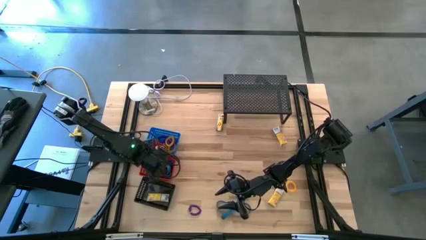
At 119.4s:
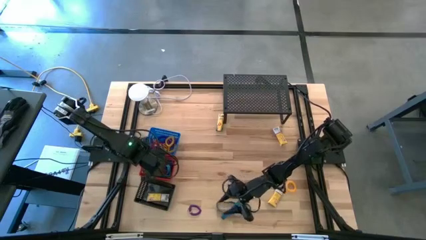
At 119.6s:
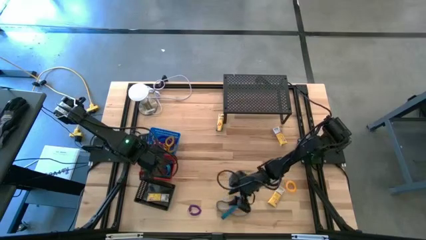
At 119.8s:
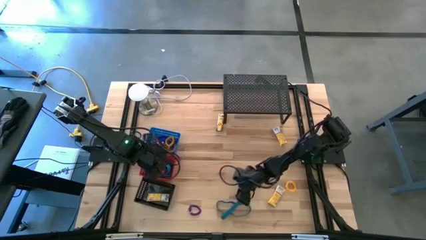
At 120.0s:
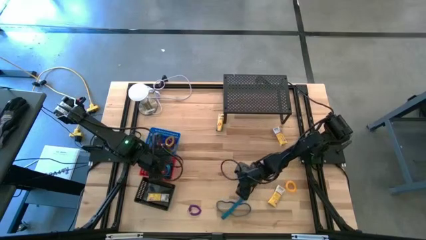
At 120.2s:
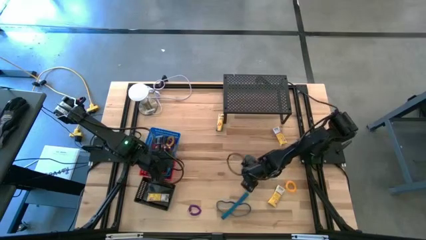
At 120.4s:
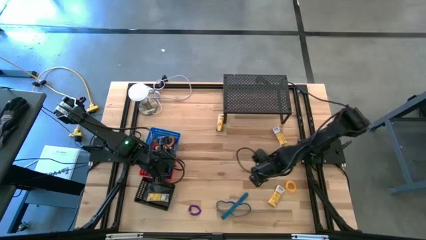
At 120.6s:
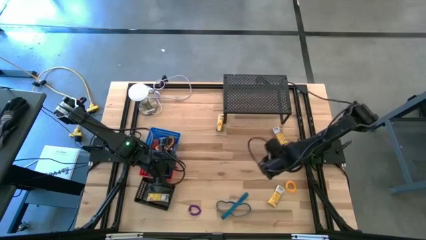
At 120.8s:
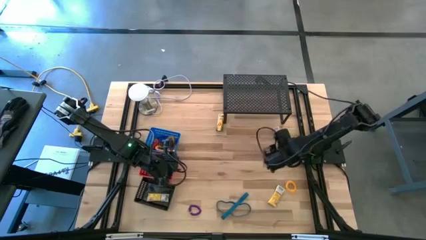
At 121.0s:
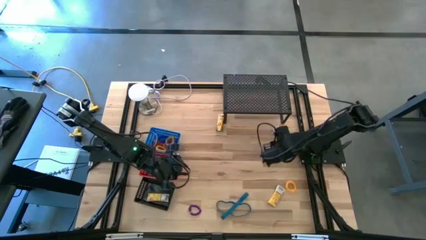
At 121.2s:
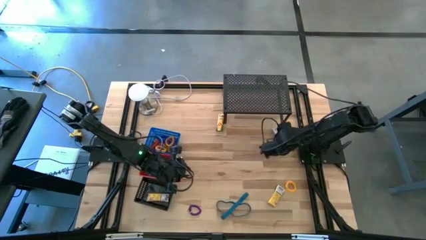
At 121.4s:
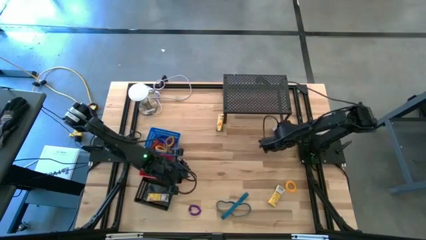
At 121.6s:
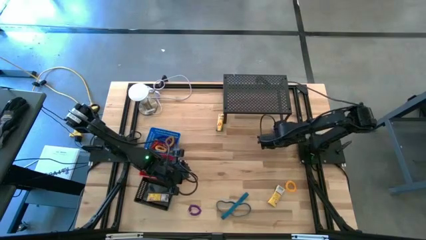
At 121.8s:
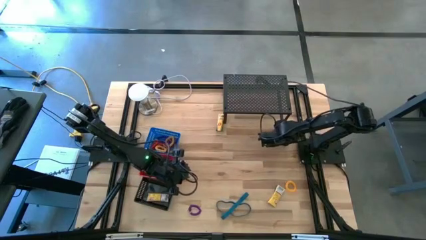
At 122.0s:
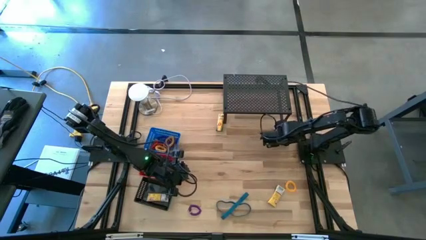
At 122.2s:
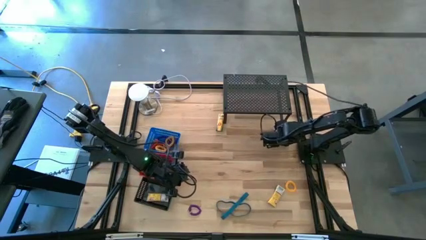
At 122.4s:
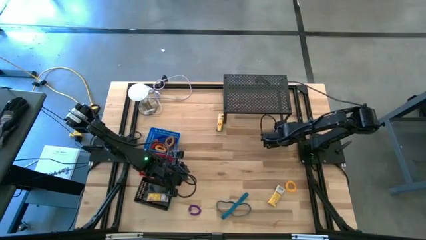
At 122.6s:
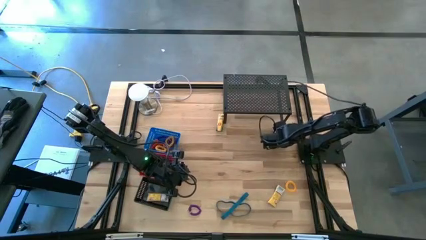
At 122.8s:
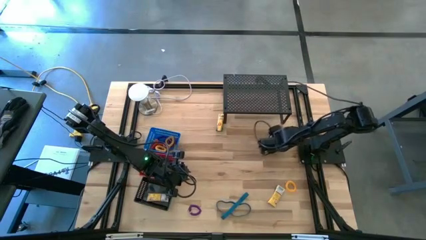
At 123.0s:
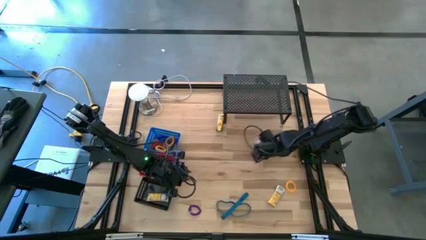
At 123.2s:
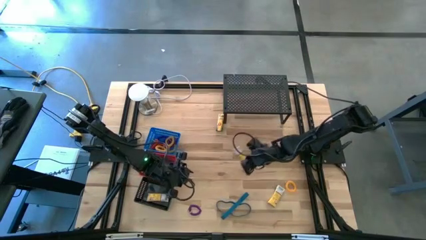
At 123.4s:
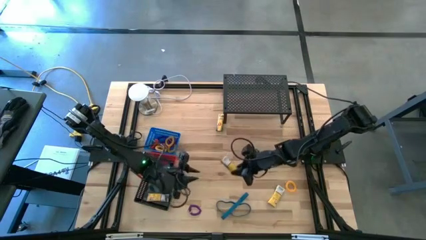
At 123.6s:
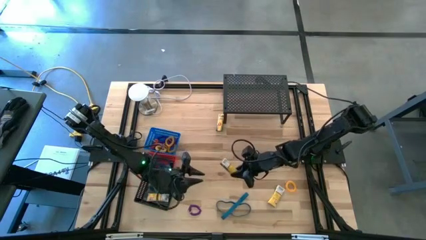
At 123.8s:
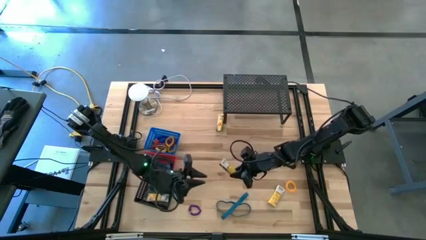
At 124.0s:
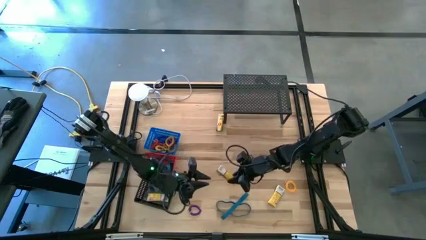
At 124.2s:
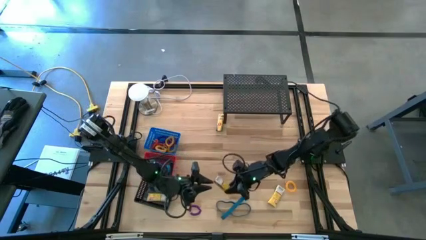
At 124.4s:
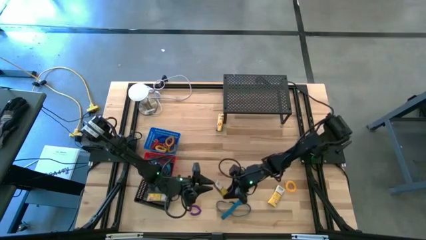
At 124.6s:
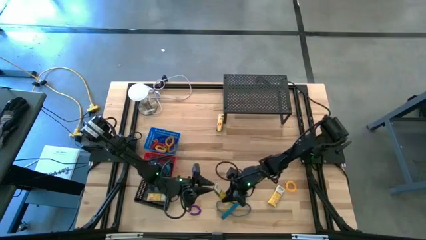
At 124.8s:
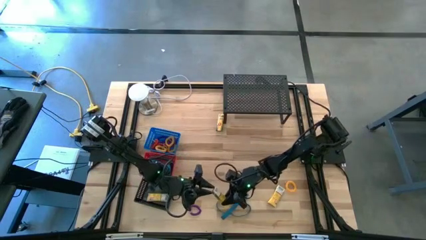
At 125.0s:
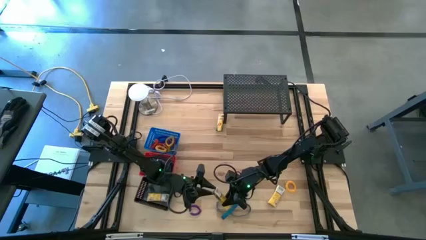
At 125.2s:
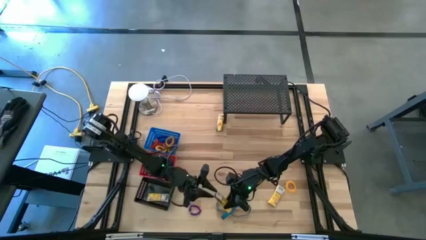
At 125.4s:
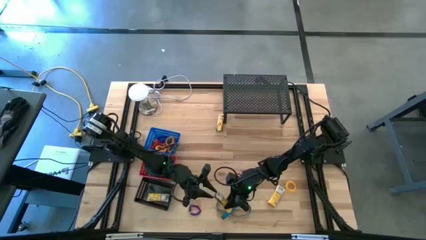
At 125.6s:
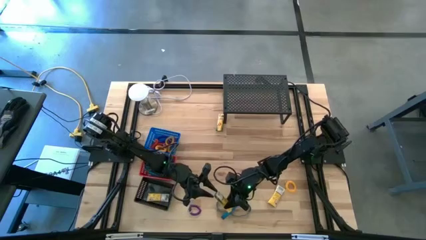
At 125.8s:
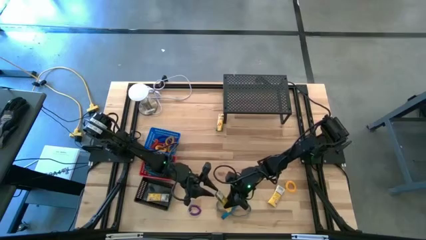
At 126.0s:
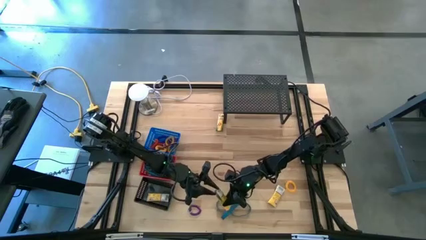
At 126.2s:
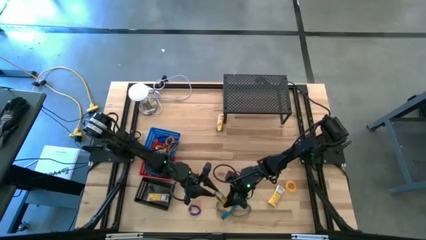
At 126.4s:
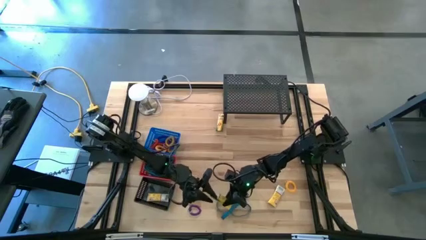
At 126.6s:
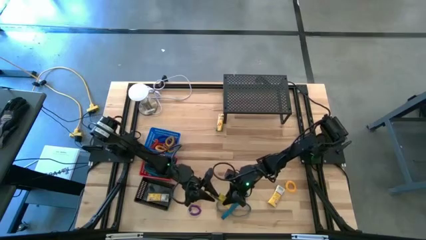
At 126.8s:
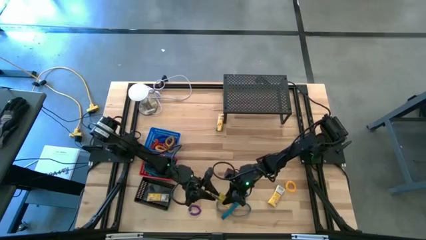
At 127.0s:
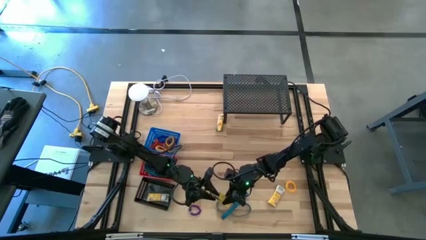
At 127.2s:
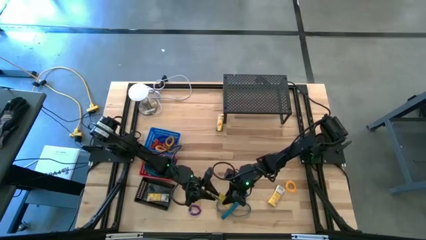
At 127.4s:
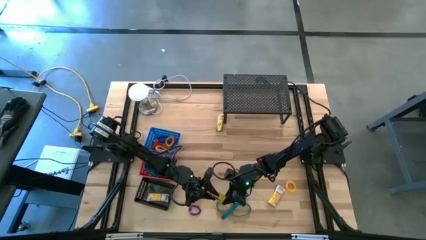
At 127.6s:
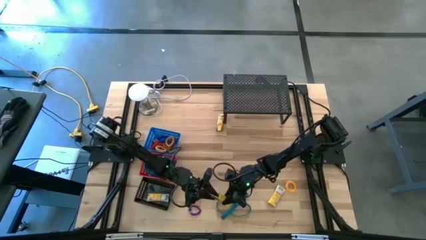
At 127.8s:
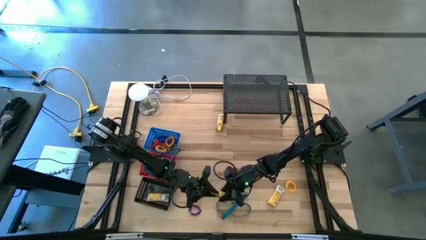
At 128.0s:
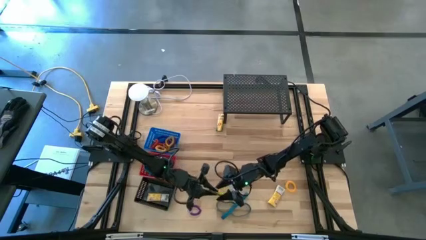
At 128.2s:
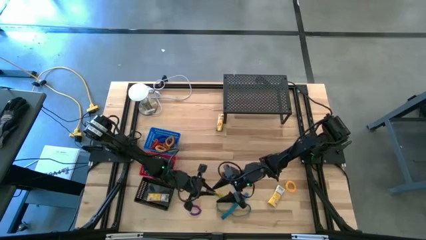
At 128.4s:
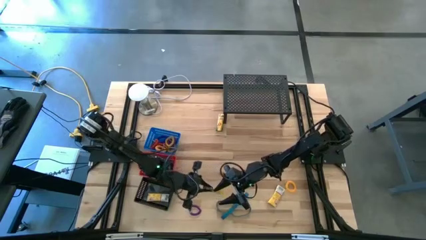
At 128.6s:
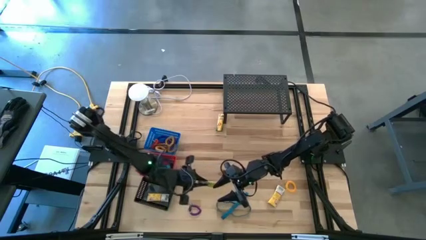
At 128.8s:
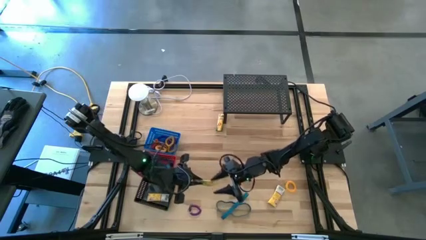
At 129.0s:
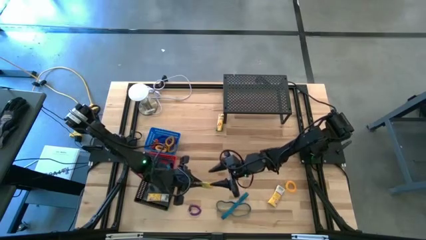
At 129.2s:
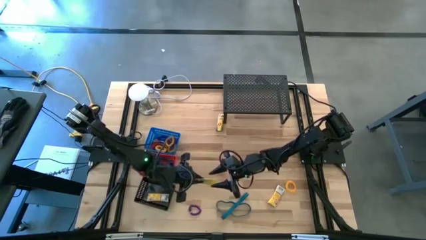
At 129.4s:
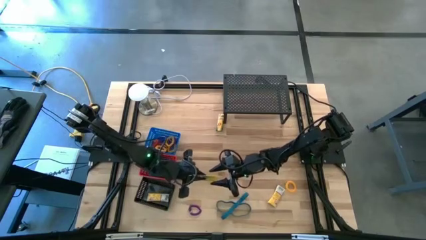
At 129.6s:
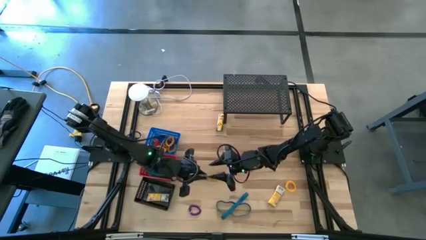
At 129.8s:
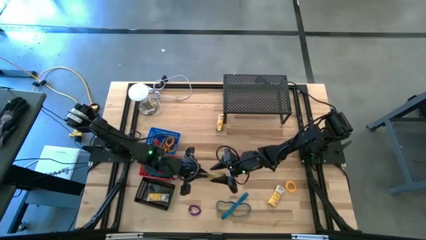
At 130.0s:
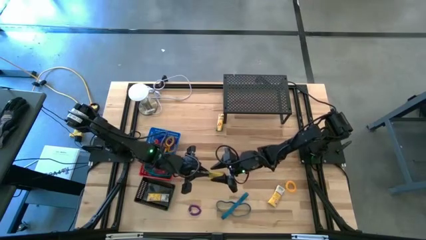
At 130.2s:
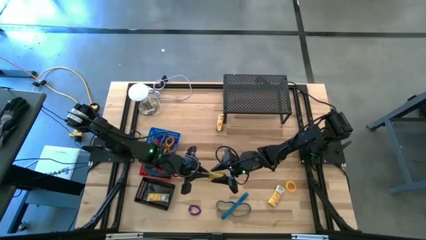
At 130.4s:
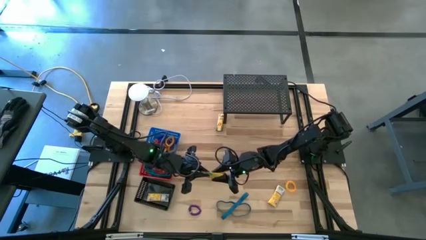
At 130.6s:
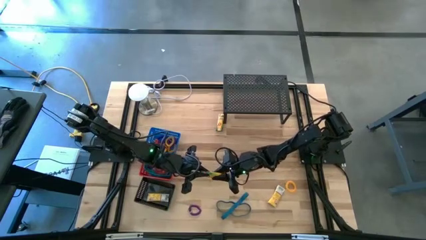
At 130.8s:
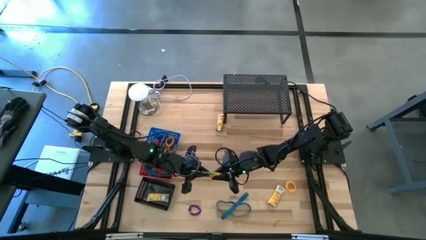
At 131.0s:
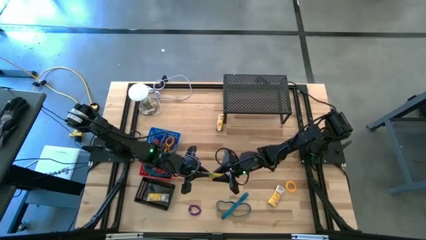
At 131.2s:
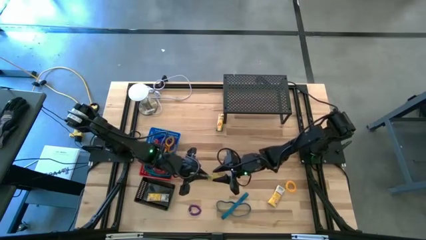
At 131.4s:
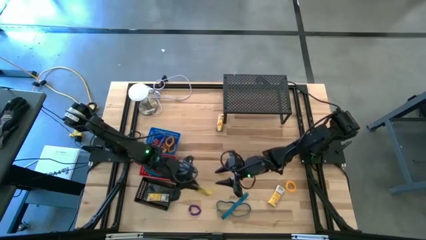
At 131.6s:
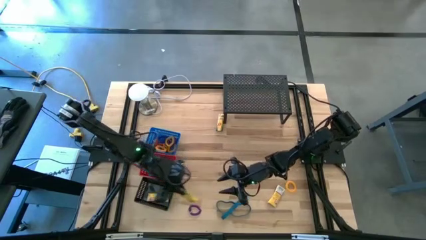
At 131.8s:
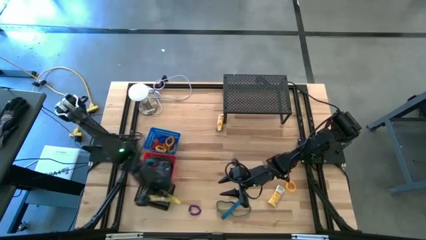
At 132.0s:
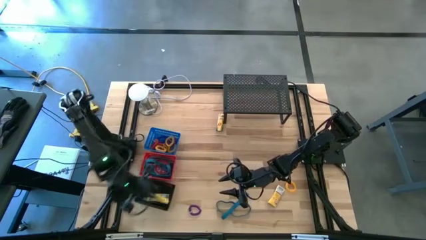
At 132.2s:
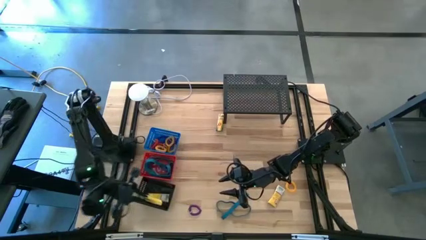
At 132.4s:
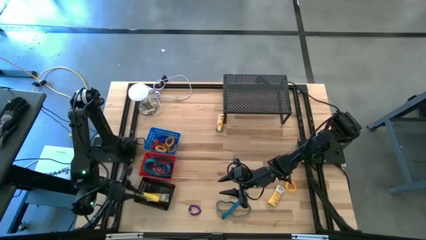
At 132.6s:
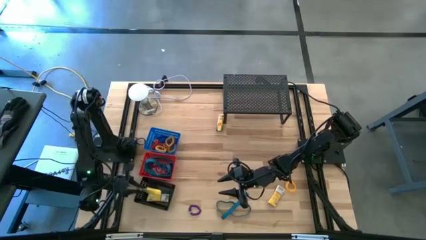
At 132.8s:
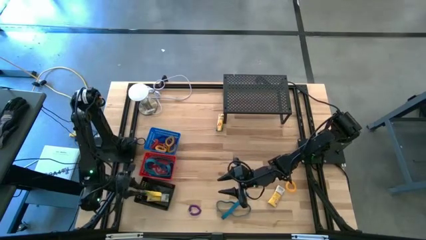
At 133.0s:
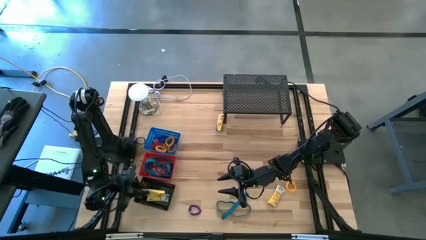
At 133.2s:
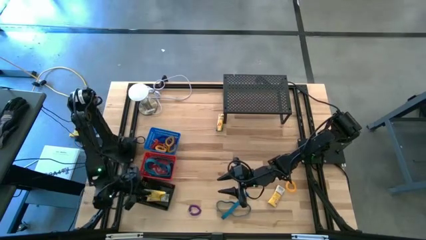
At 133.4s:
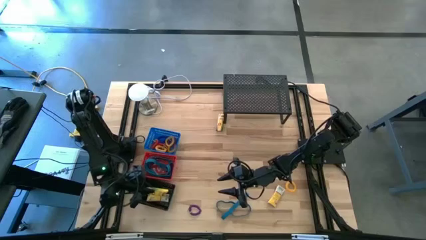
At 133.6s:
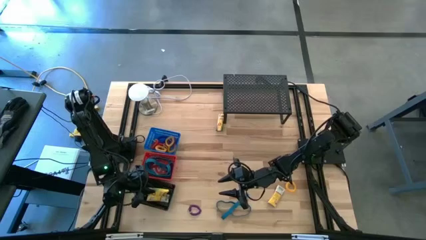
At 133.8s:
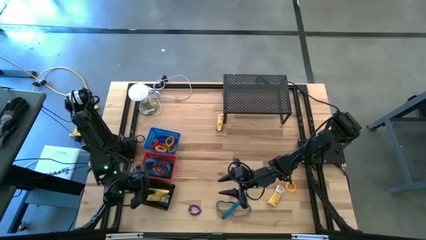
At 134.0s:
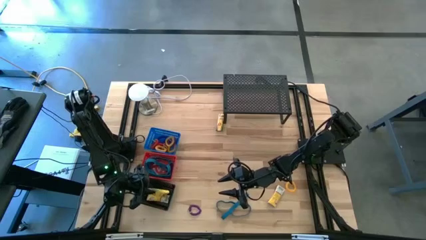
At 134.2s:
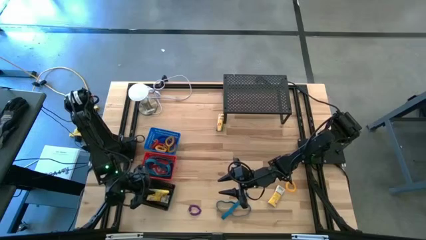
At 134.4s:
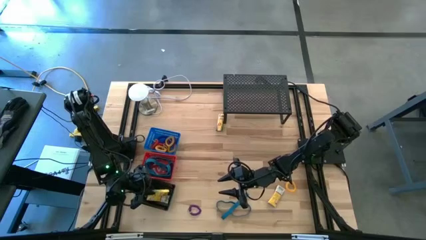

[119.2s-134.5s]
Task: Pick & Place Office Desk Supplies
Put the yellow crayon box into the black bin
